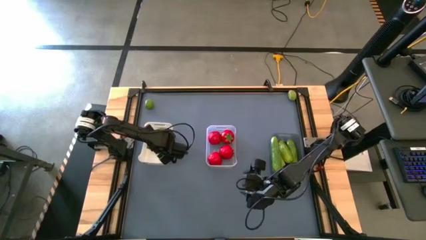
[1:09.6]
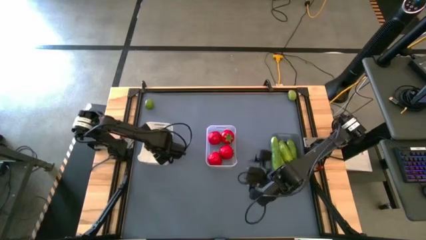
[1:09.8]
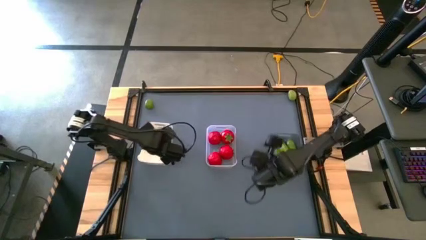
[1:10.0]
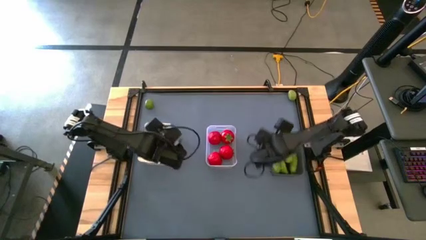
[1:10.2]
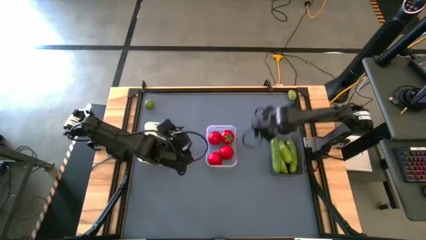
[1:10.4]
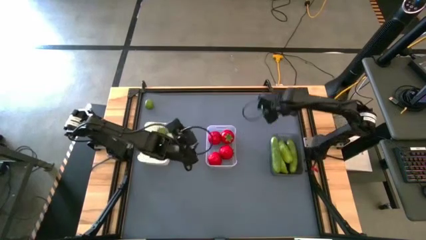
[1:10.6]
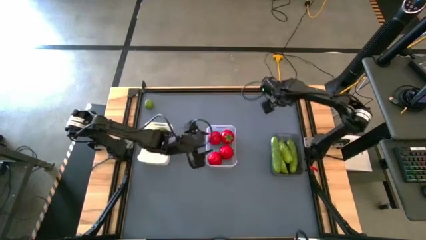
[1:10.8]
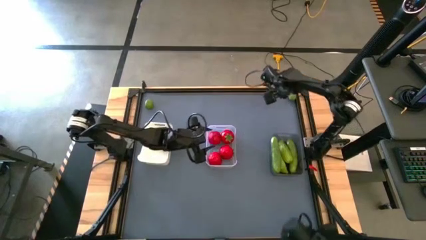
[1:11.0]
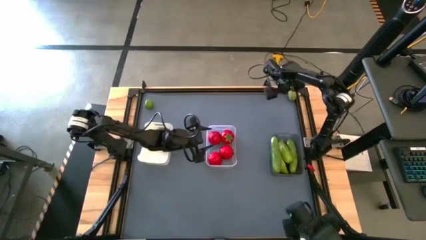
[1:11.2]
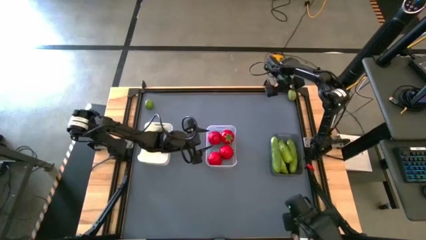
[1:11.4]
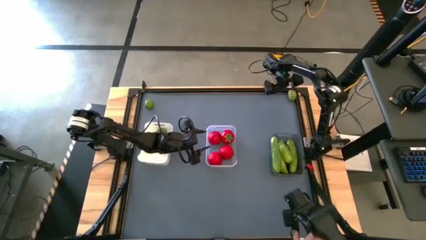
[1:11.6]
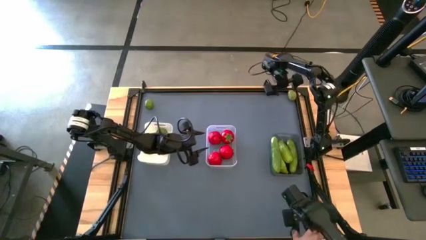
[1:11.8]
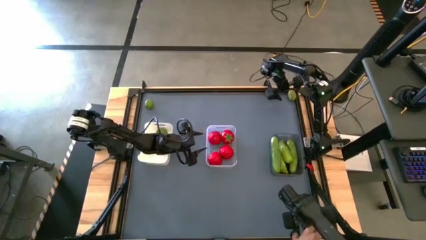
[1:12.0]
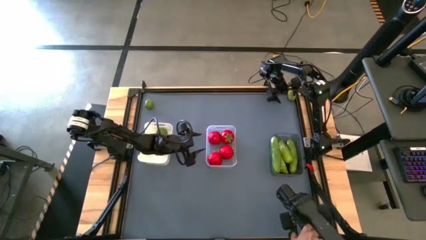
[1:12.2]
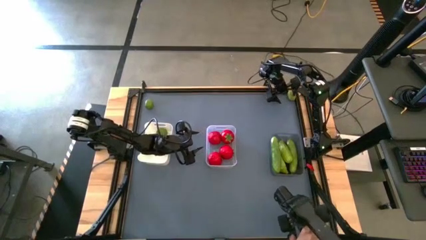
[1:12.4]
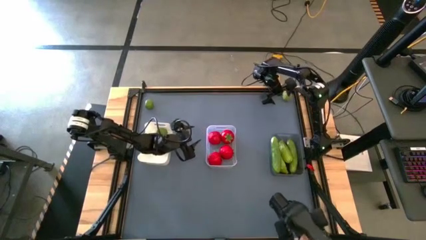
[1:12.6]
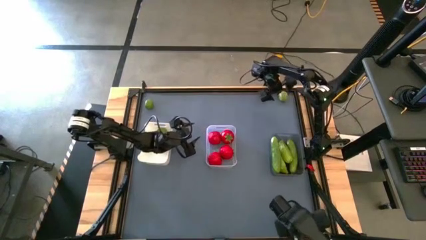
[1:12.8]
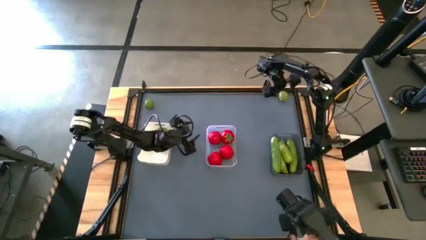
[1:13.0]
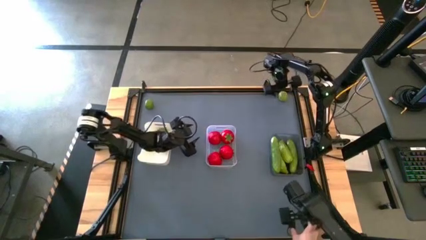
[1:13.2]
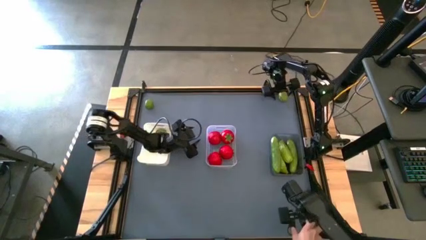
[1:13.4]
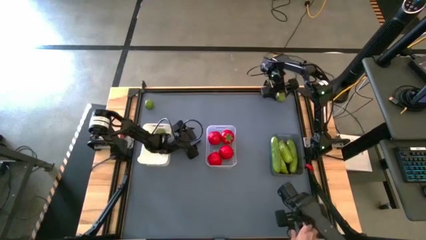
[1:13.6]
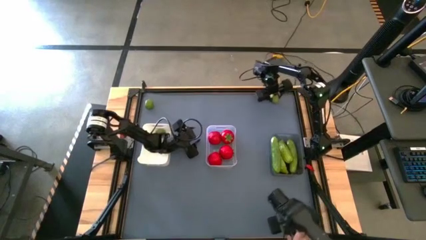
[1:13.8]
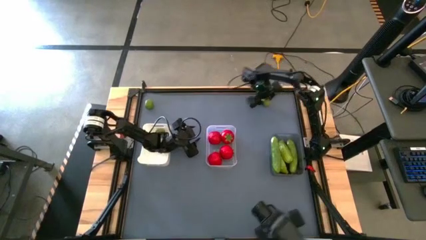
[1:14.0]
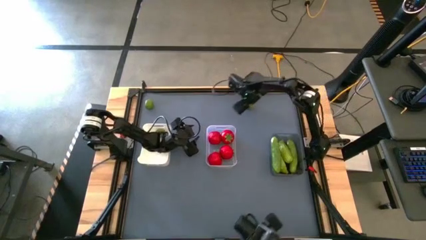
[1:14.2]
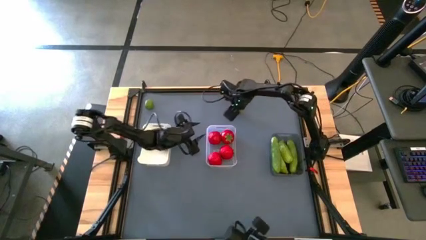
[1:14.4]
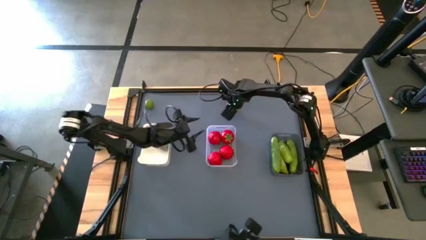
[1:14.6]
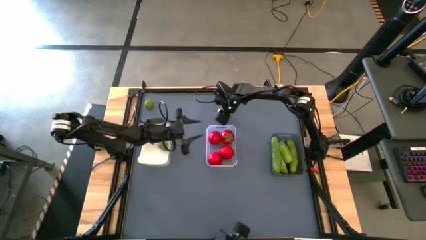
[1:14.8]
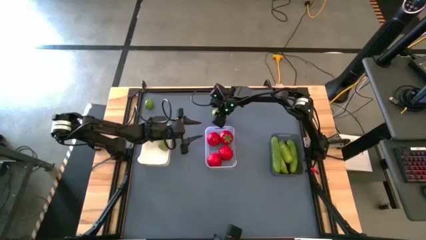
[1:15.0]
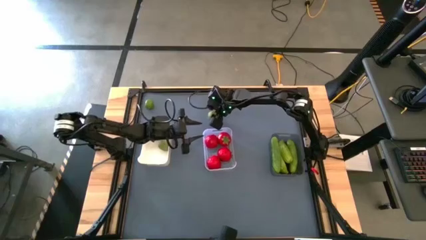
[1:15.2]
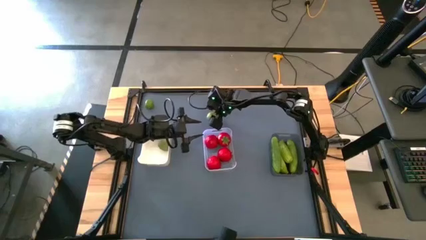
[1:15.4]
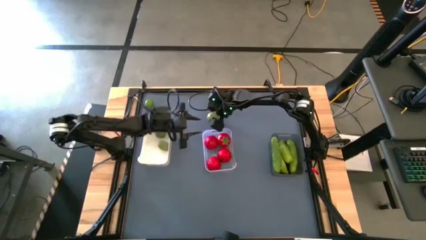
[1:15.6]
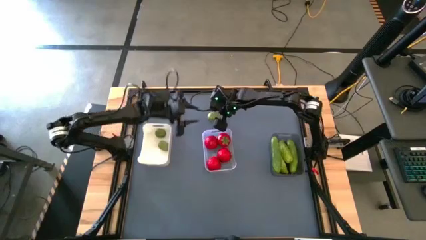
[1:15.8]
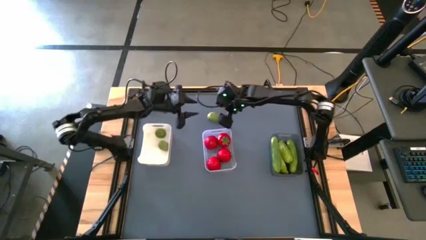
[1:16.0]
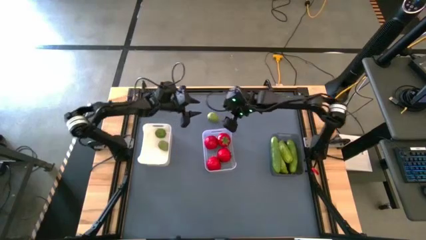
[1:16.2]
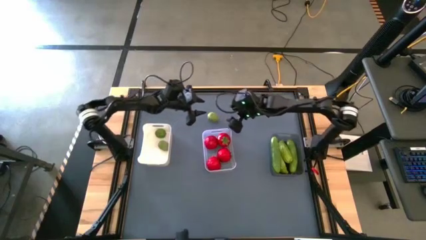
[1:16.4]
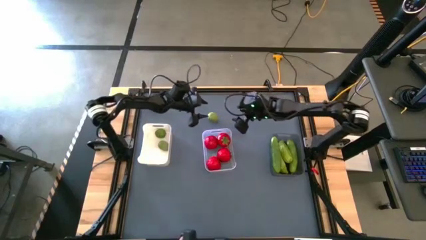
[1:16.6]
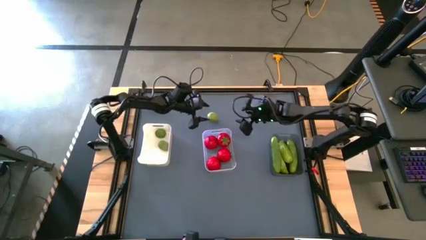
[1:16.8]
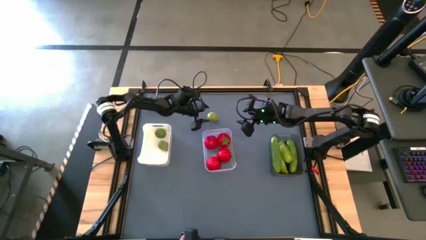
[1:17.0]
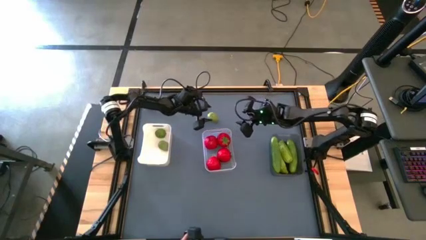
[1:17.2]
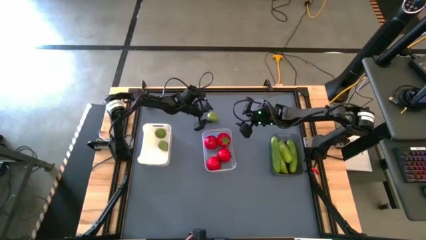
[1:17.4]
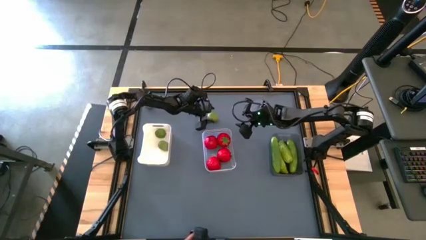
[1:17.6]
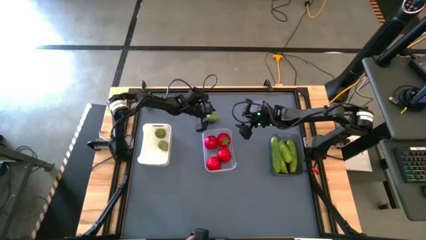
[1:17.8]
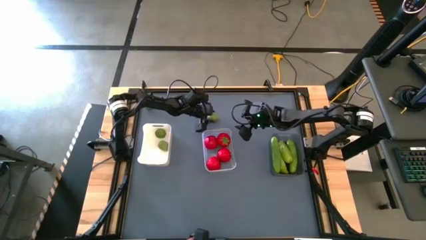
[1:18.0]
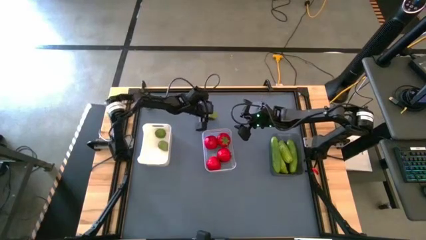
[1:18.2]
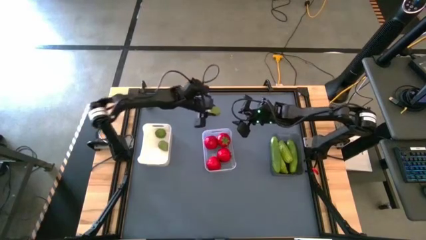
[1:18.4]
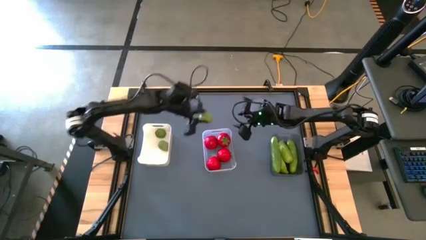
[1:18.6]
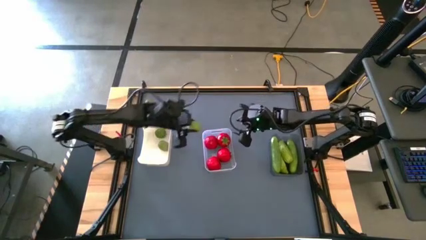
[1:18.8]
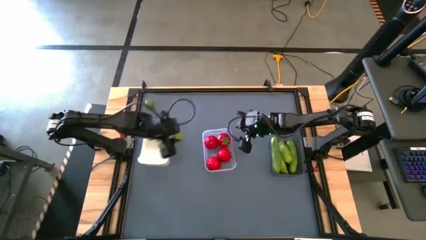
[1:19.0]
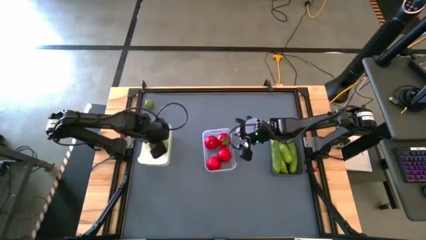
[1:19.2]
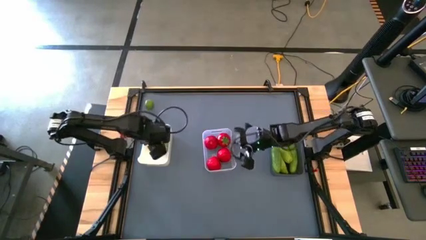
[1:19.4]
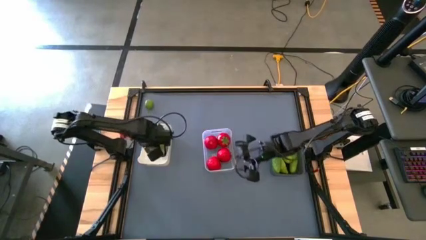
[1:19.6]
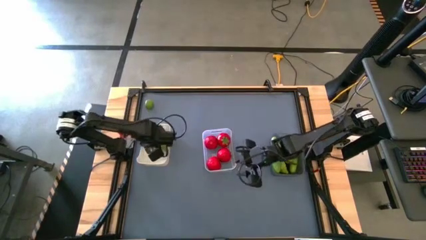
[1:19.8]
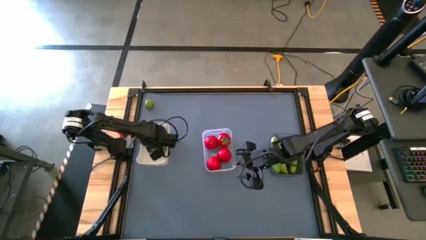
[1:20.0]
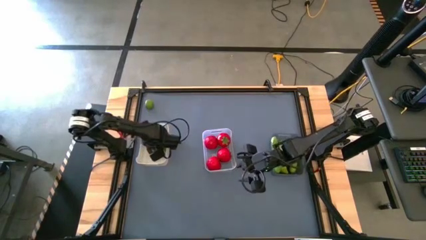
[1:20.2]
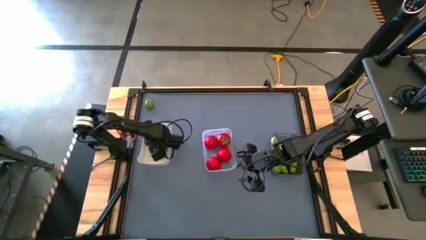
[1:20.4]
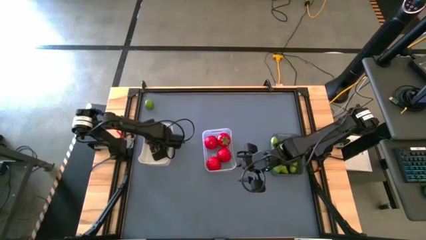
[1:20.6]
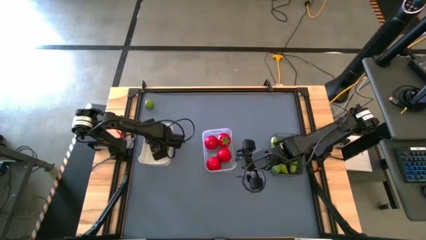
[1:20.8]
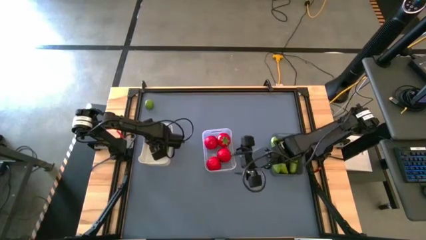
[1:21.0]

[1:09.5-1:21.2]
Task: Sort produce into baskets
Put the green lime into the white bin

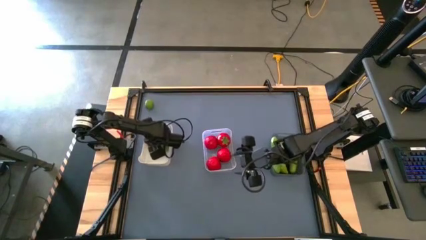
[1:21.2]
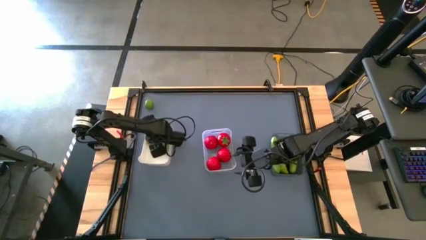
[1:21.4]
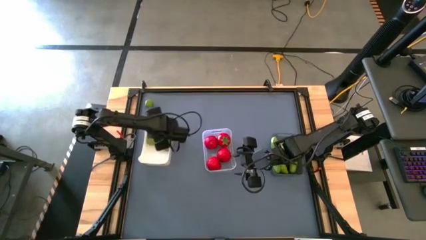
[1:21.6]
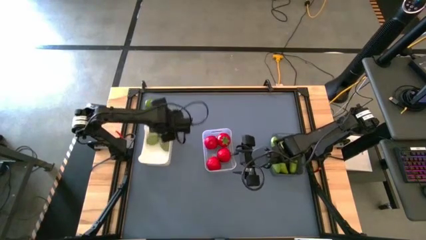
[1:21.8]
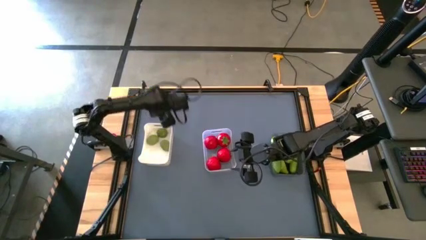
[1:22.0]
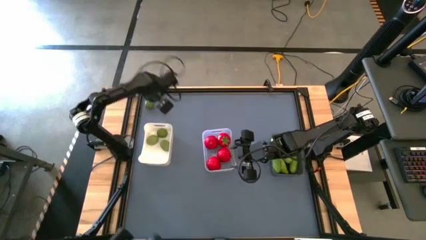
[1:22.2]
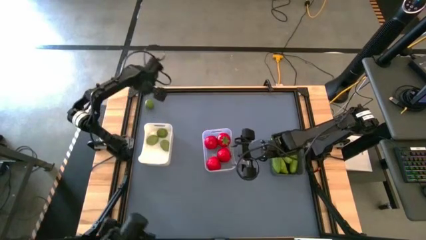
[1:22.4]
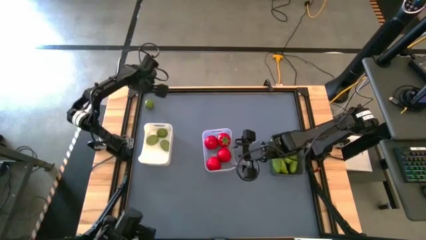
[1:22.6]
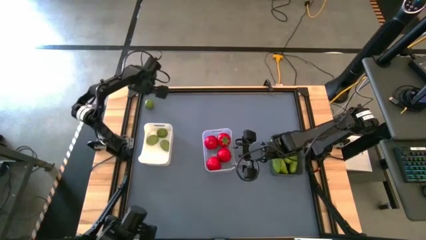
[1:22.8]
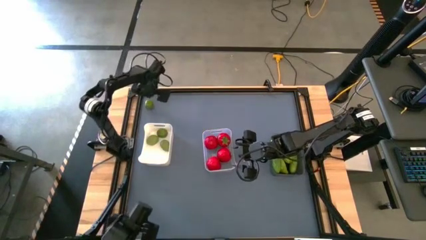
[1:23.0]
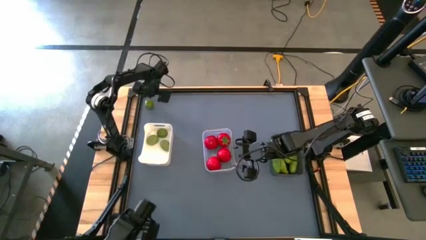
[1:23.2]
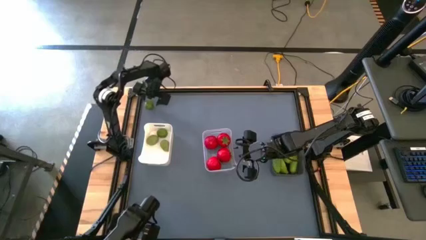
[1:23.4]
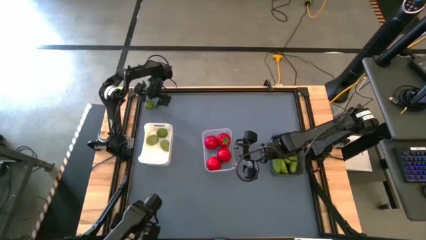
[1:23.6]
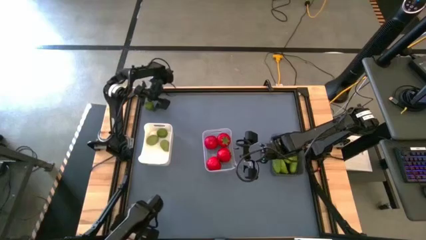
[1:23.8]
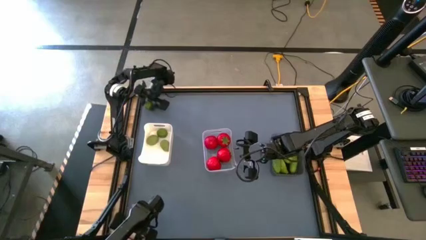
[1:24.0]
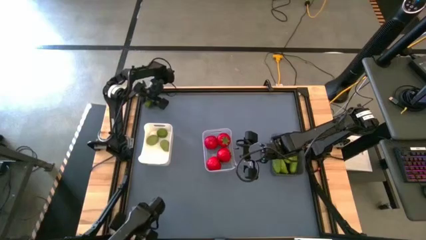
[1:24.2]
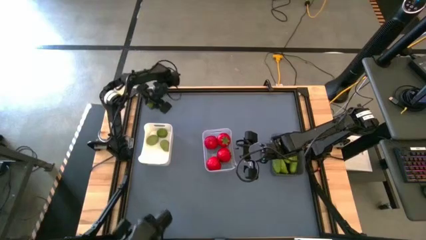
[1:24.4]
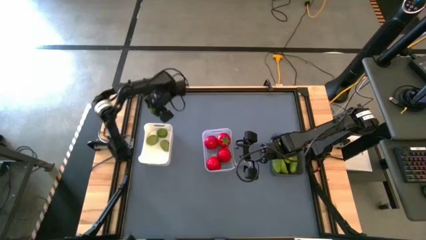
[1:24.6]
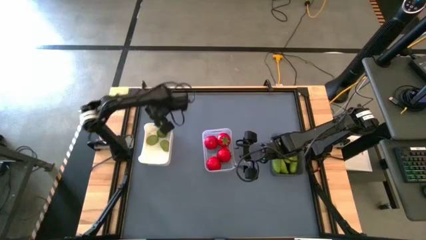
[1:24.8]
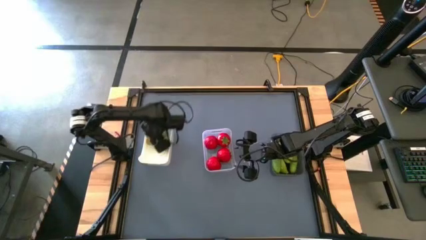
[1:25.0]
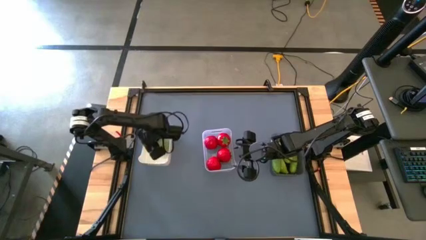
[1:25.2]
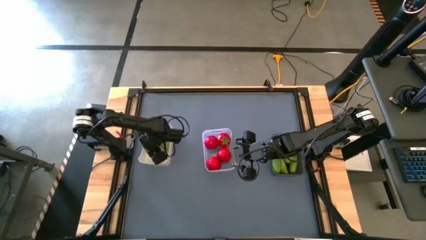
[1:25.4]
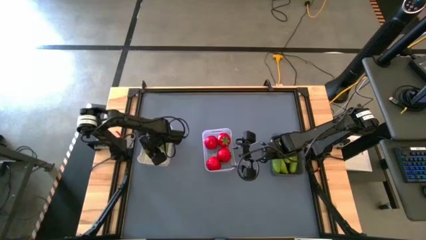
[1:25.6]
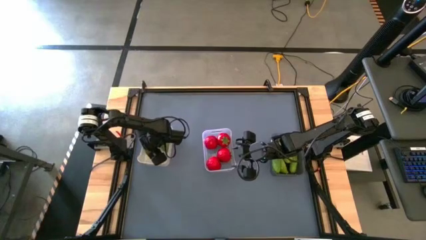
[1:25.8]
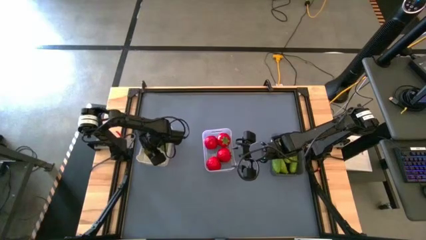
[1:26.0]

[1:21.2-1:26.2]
Put the green lime into the white bin
